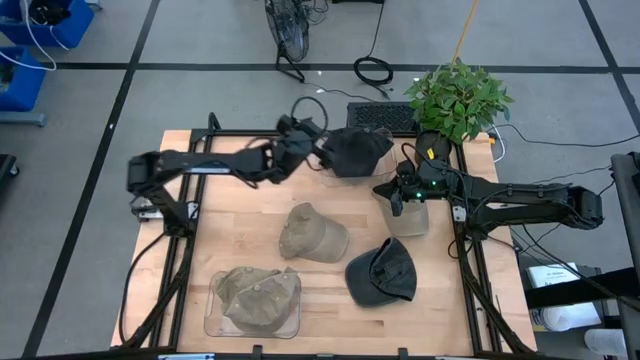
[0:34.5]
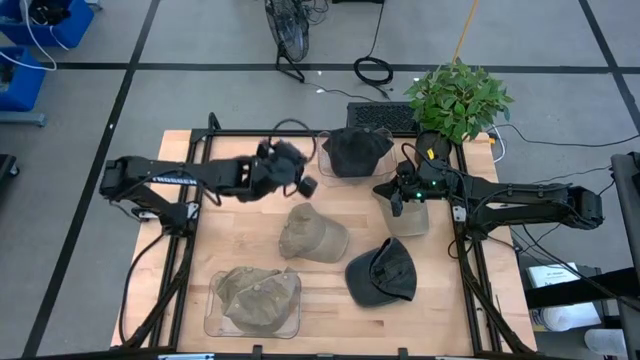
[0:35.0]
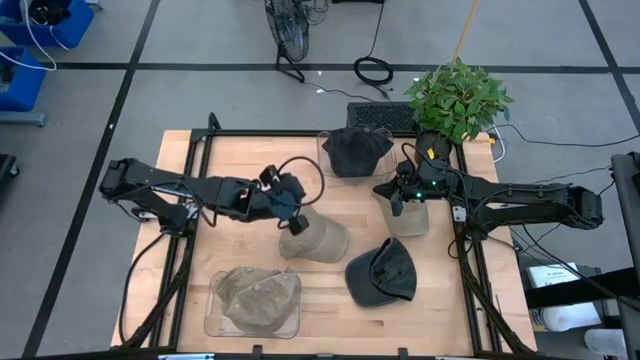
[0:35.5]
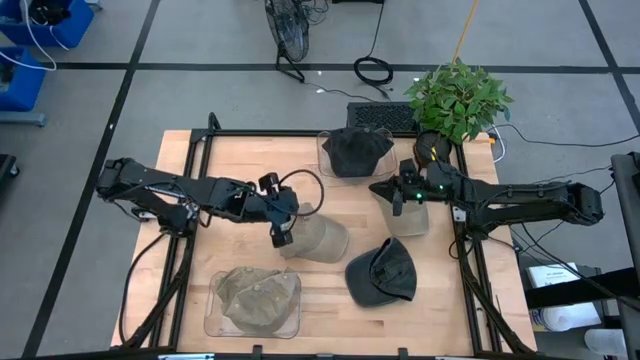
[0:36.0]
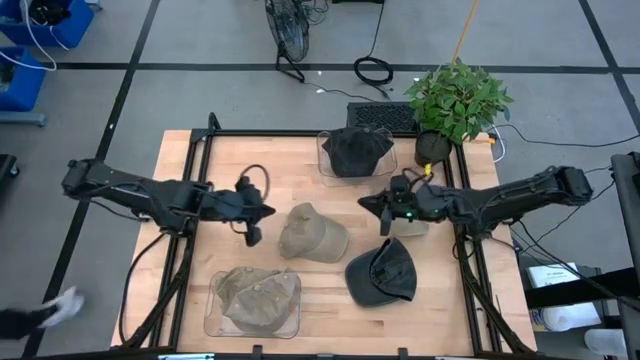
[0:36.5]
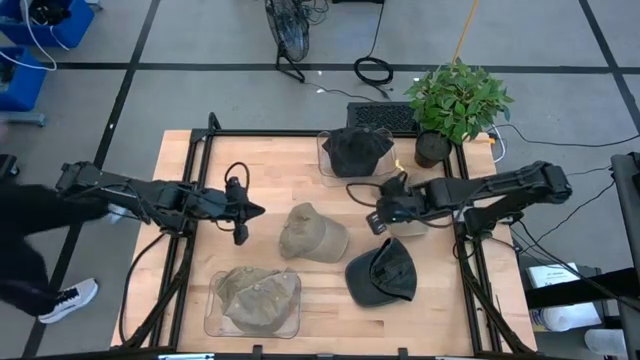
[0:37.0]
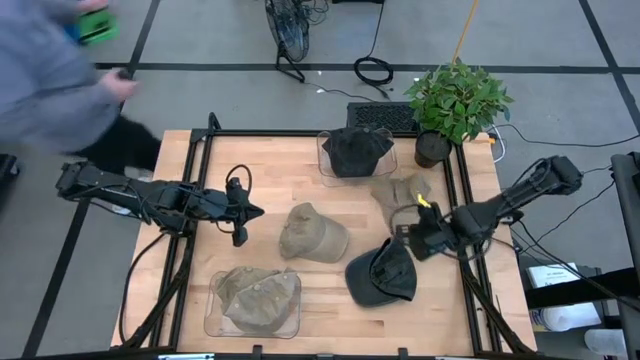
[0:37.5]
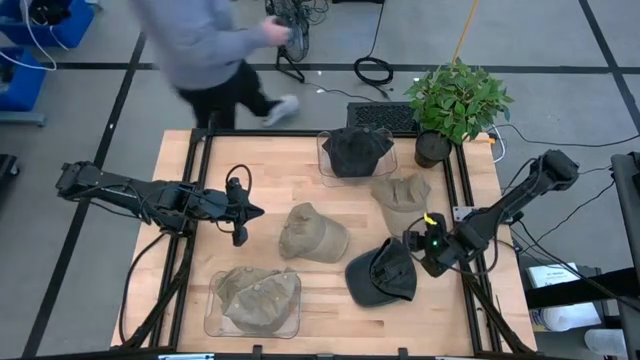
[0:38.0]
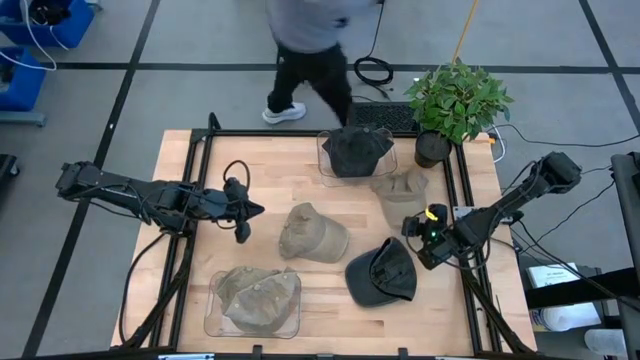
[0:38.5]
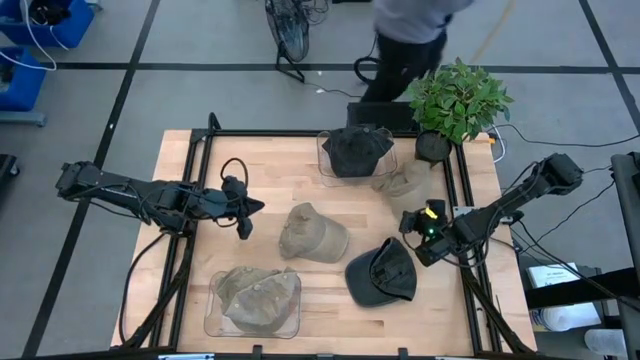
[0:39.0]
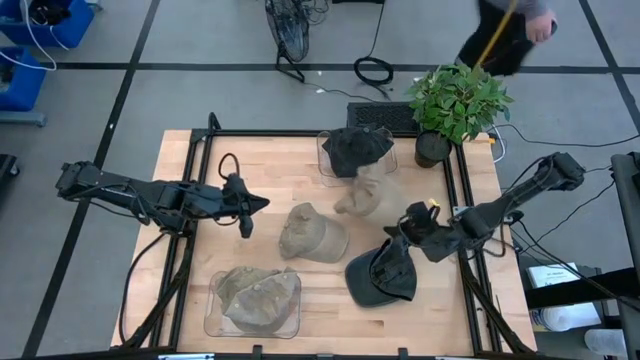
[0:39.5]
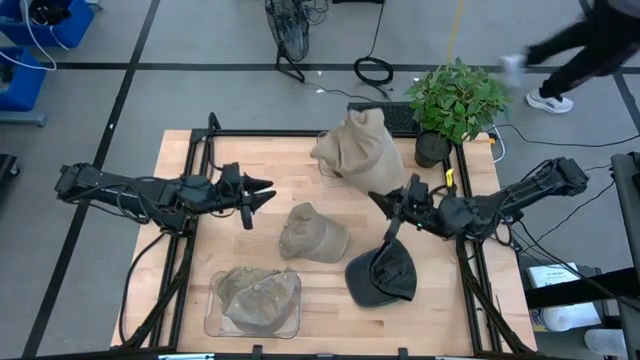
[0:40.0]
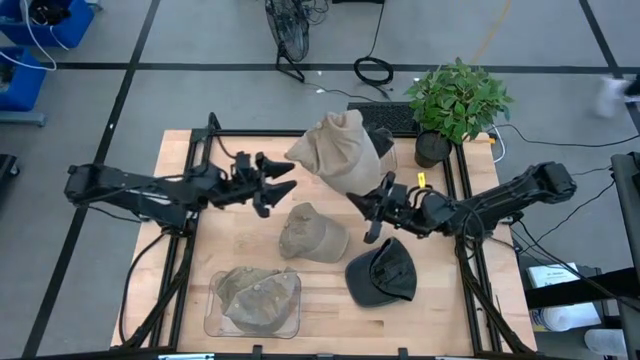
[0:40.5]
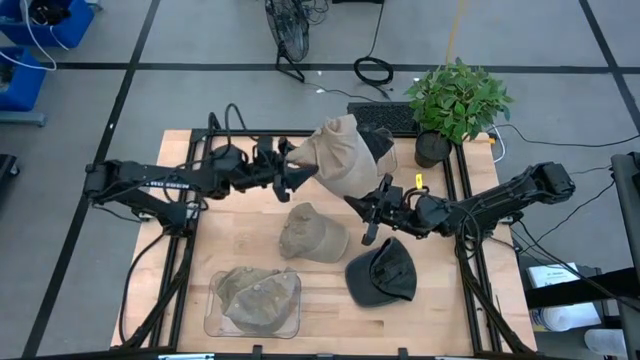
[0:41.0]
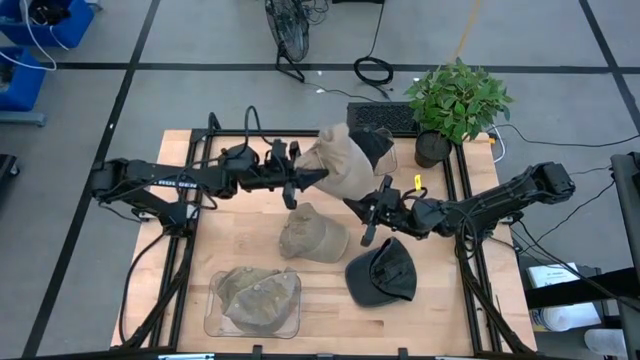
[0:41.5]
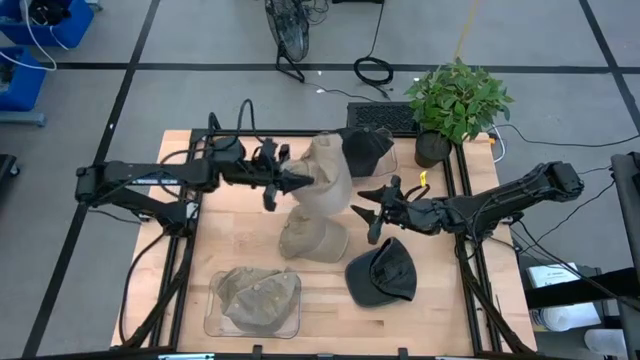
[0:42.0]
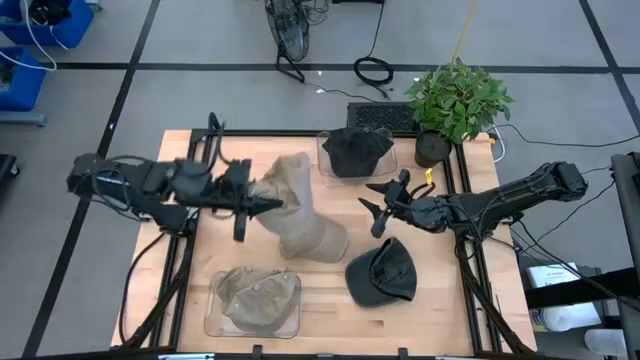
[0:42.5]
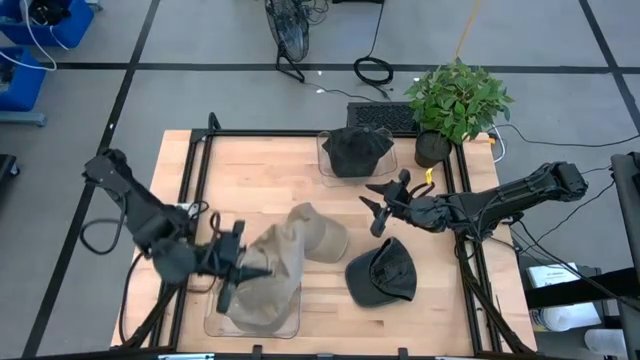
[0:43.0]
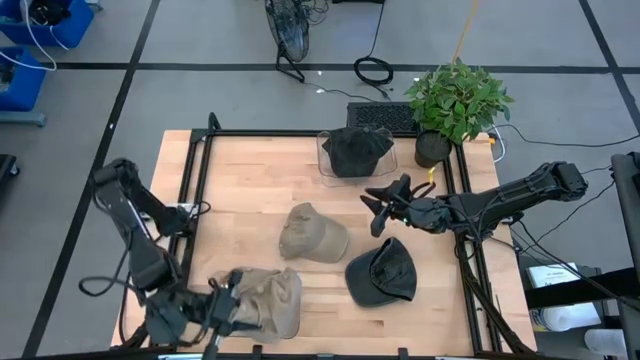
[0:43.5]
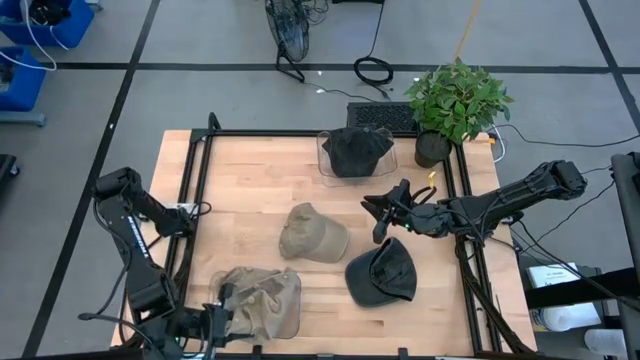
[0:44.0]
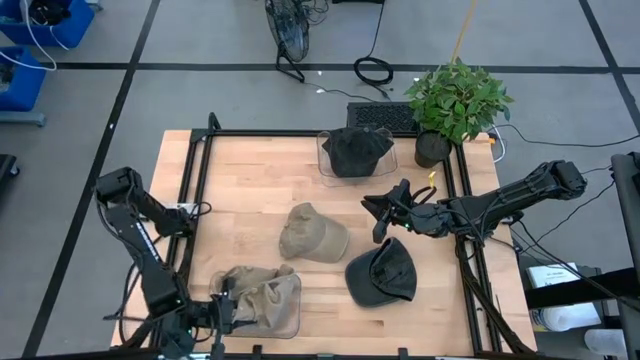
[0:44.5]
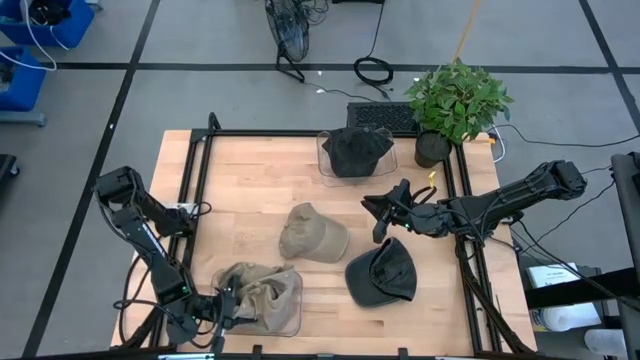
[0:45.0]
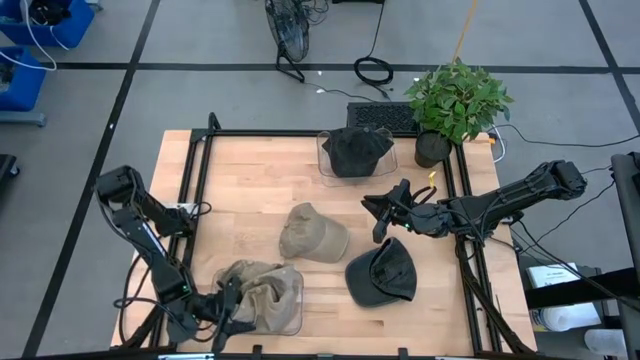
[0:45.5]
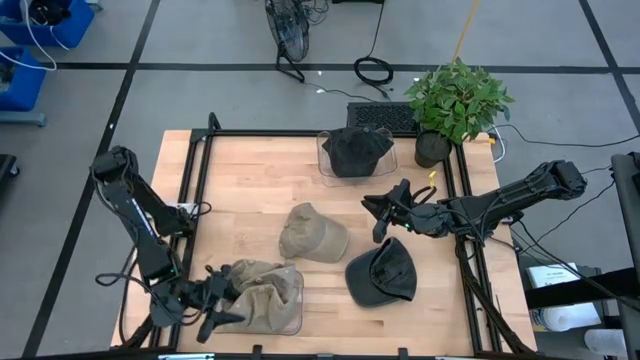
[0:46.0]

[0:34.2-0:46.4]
Task: Pick & Place hat
Put the brown cap into the bottom transparent bin

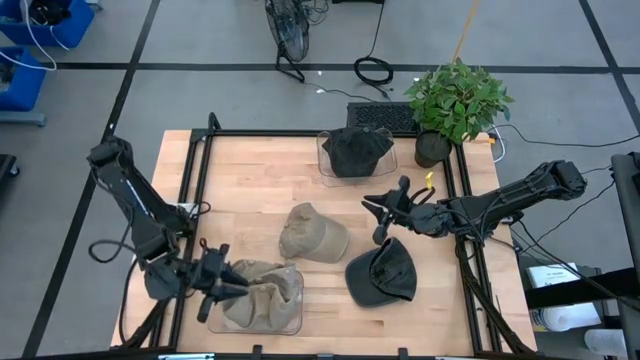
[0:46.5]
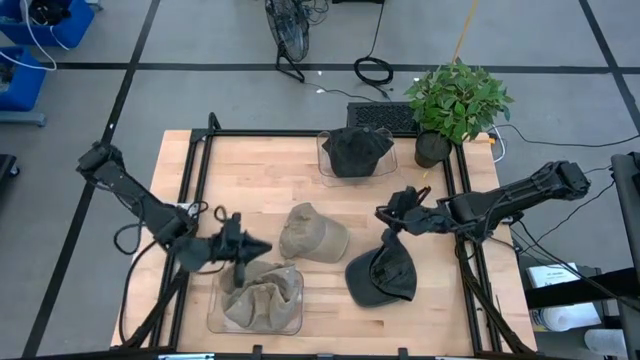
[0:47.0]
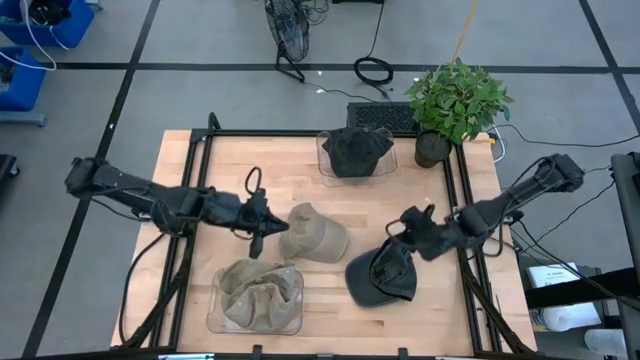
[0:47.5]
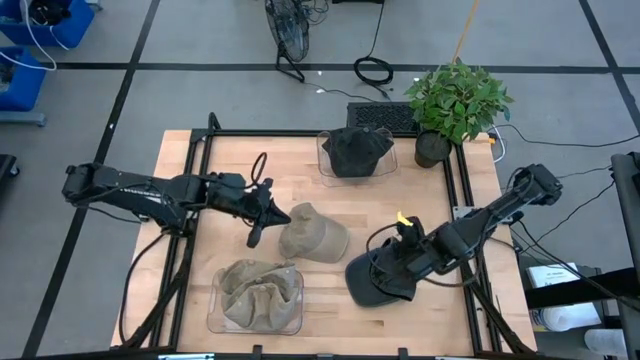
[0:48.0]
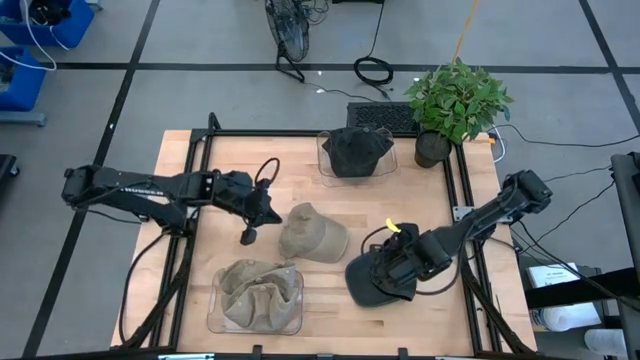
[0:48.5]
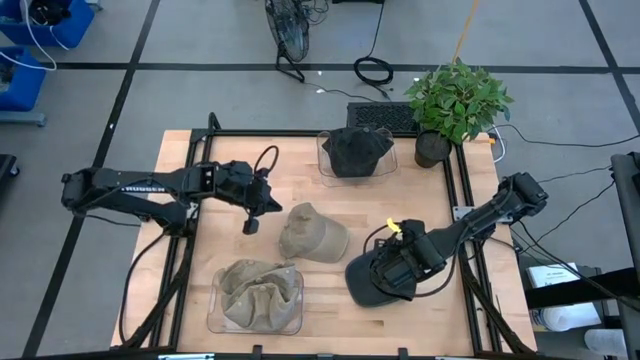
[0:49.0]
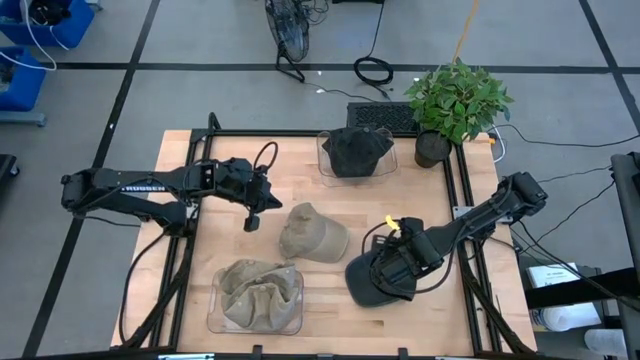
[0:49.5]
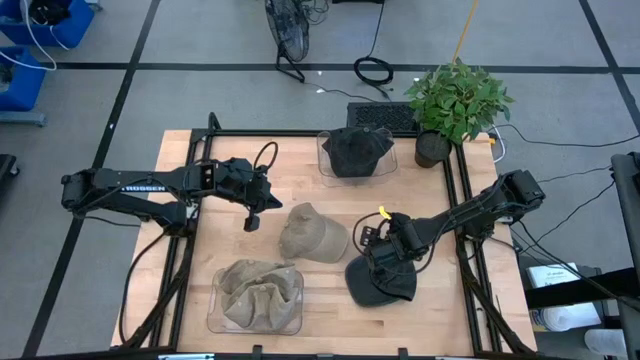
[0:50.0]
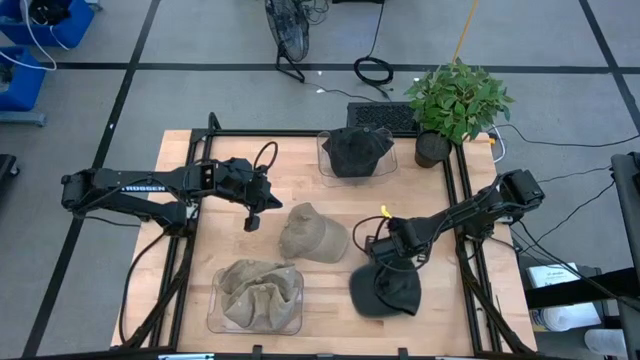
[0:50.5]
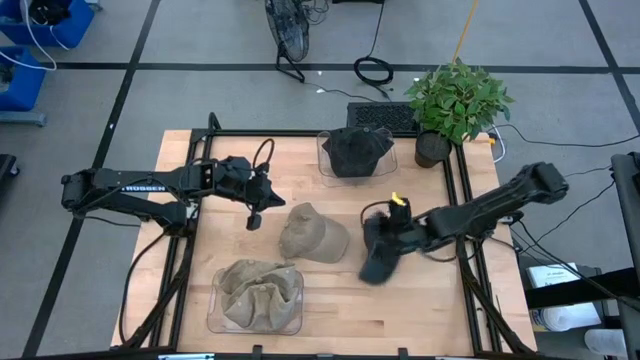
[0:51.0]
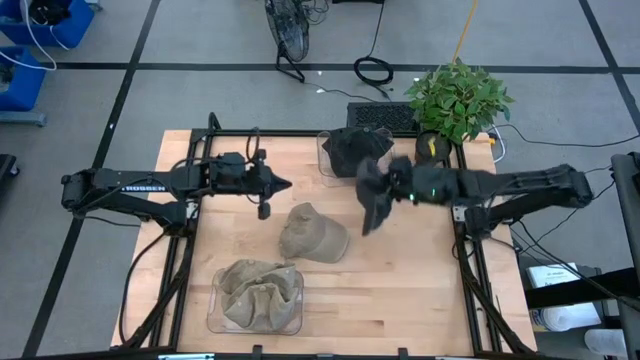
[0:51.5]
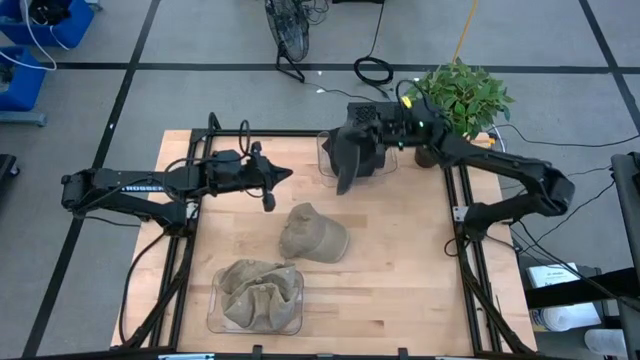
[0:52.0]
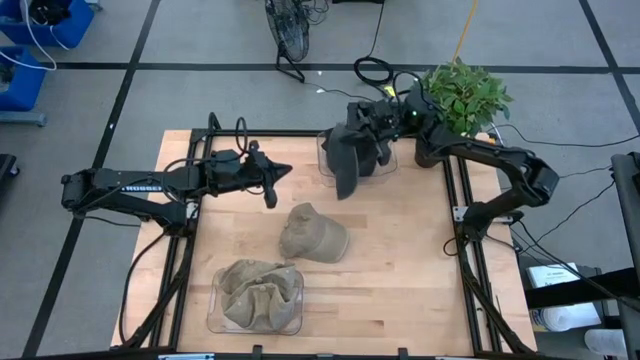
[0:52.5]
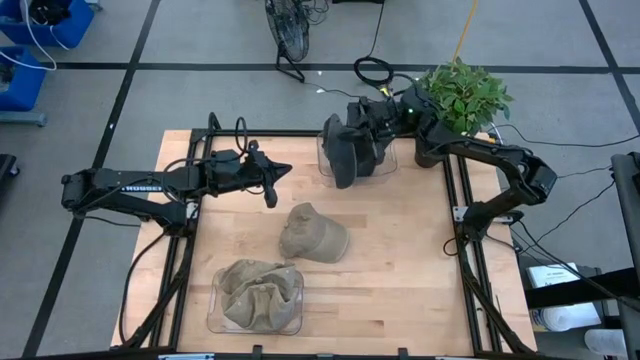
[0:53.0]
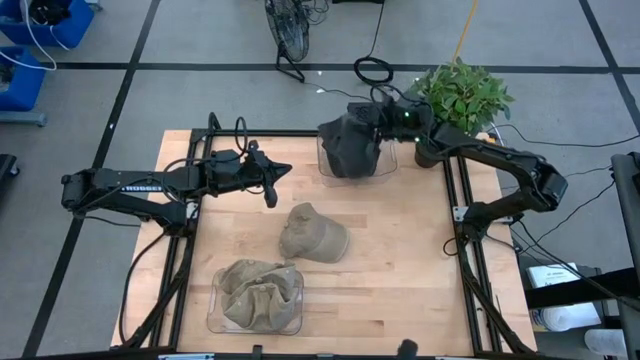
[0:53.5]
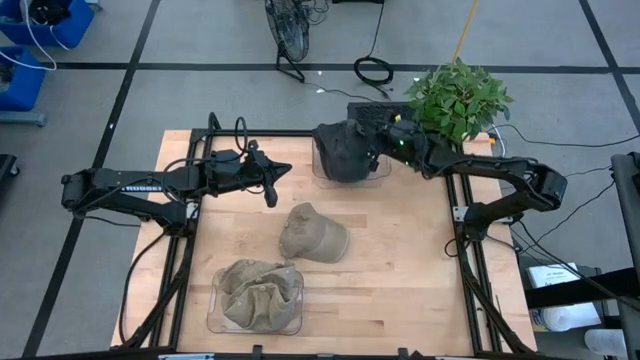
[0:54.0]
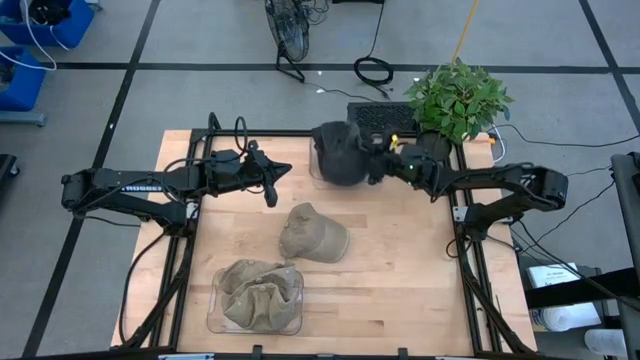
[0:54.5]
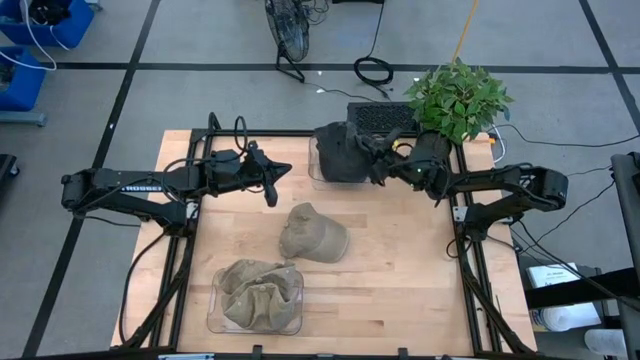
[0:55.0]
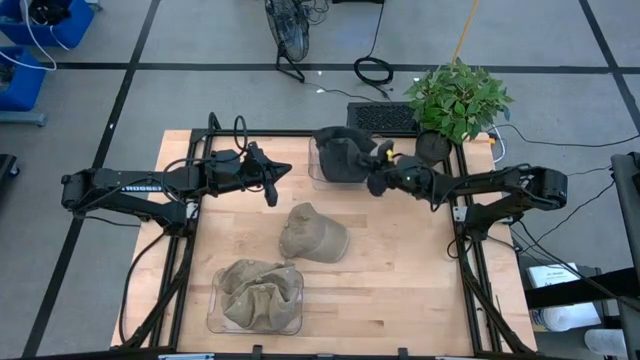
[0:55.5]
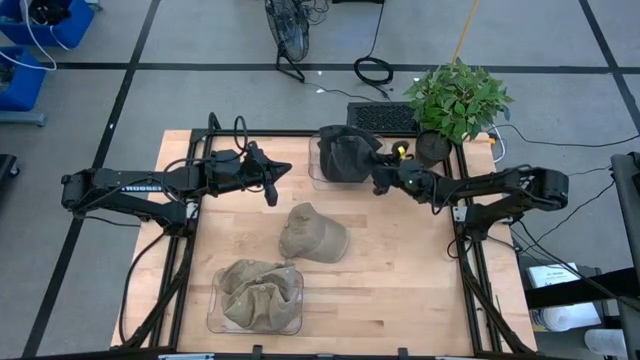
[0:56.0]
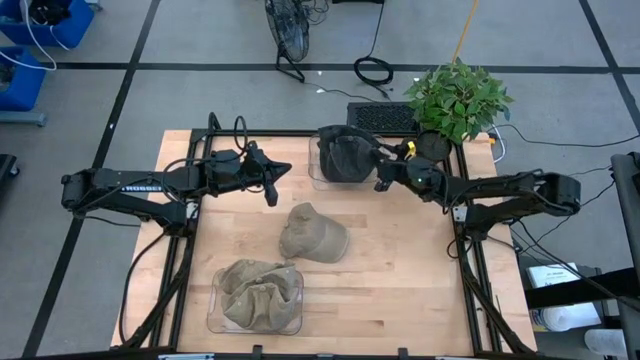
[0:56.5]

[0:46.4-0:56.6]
Put the dark gray cap into the top transparent bin
